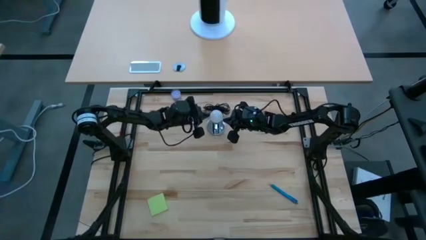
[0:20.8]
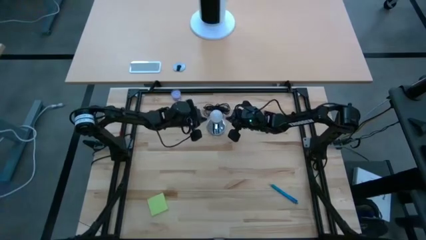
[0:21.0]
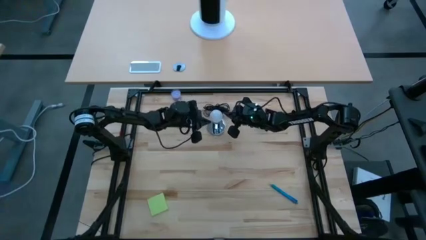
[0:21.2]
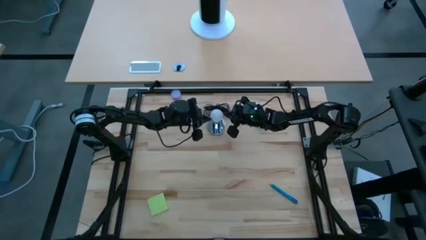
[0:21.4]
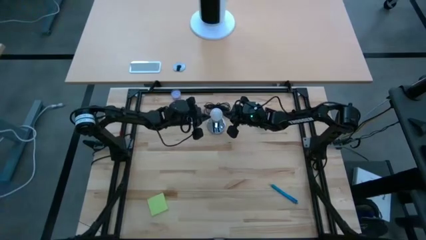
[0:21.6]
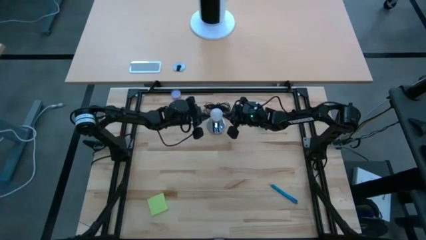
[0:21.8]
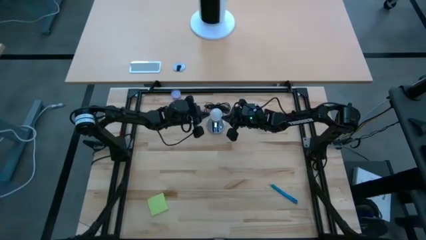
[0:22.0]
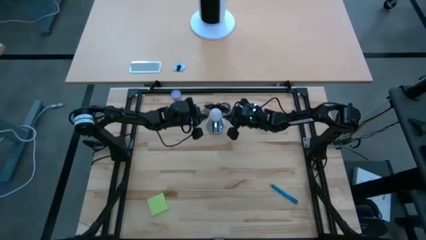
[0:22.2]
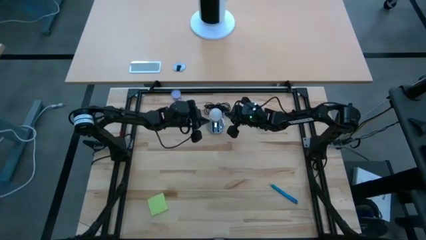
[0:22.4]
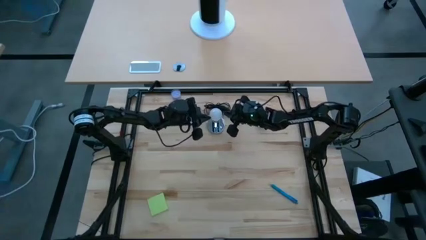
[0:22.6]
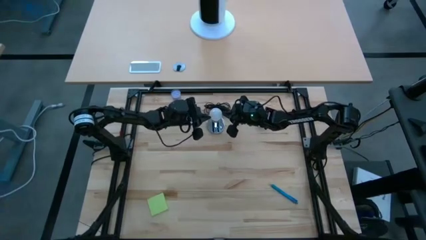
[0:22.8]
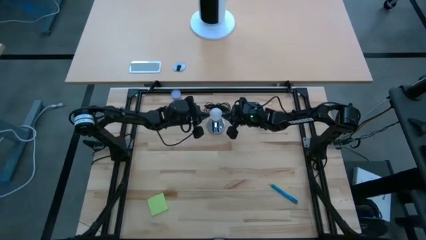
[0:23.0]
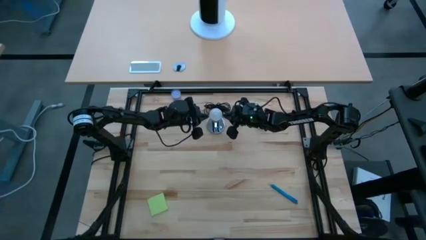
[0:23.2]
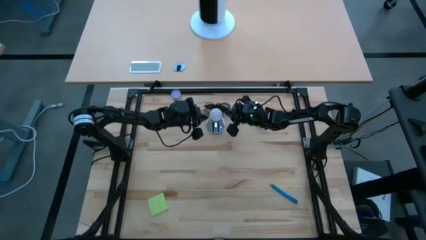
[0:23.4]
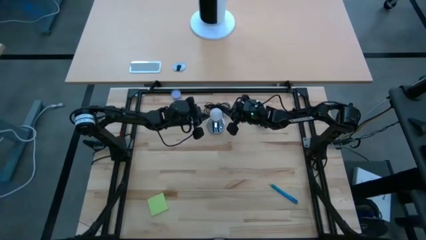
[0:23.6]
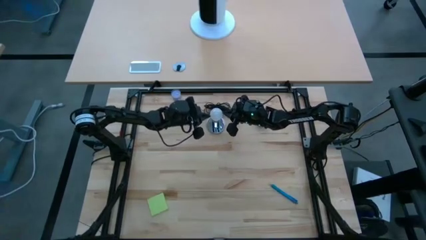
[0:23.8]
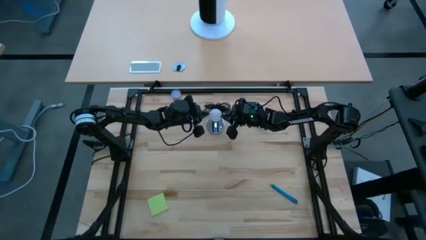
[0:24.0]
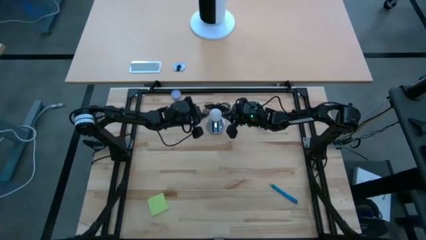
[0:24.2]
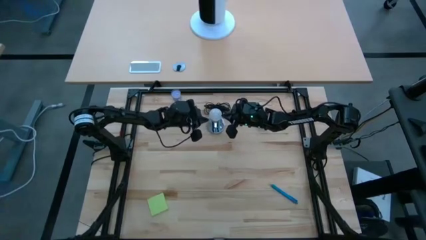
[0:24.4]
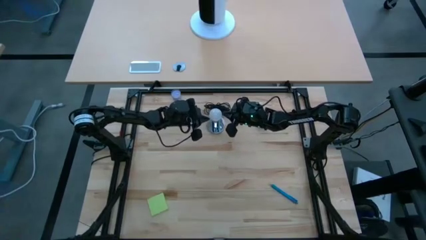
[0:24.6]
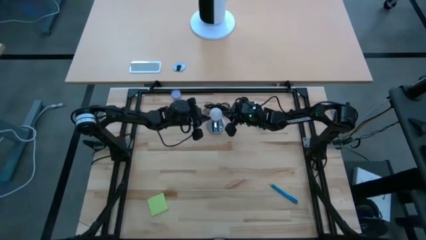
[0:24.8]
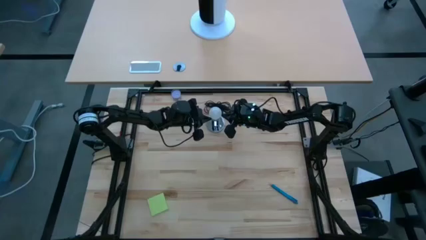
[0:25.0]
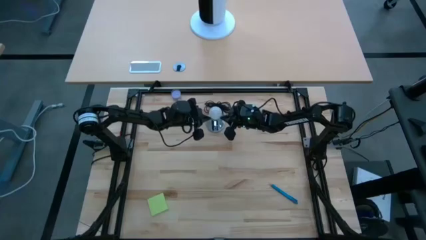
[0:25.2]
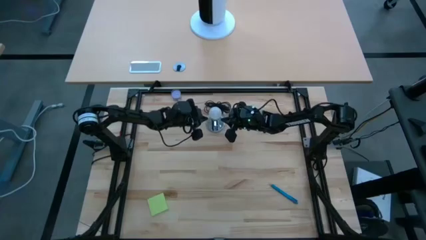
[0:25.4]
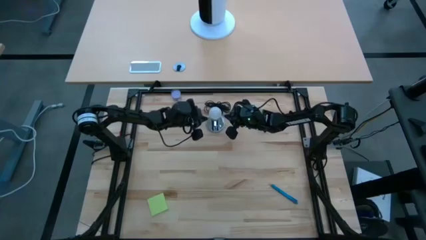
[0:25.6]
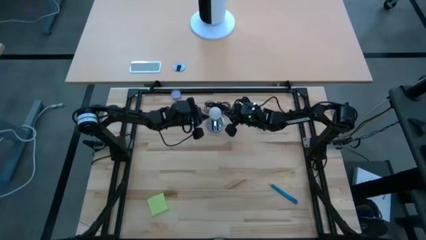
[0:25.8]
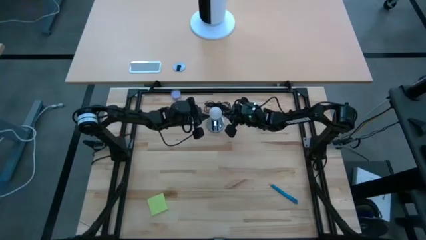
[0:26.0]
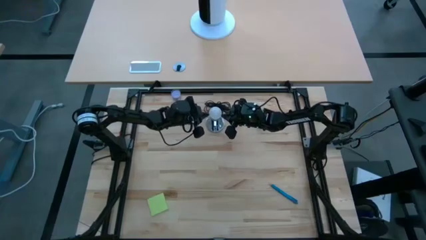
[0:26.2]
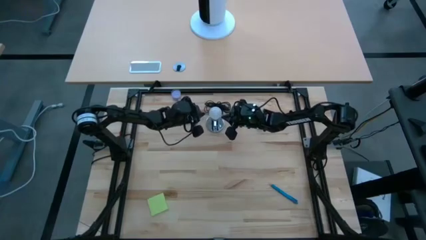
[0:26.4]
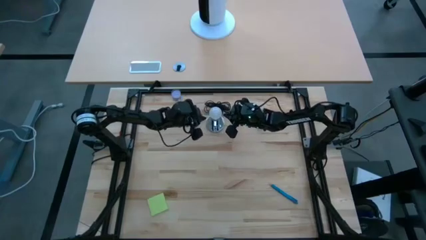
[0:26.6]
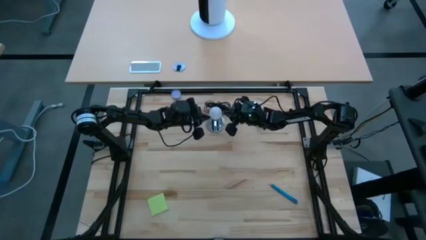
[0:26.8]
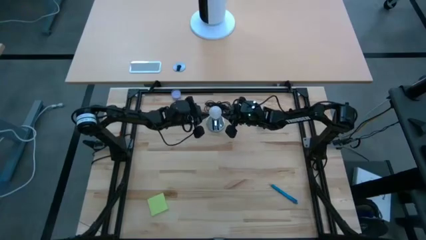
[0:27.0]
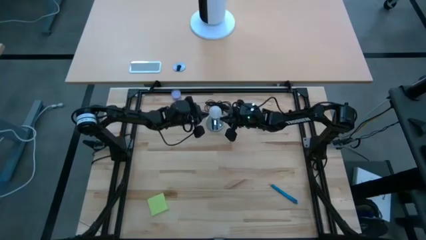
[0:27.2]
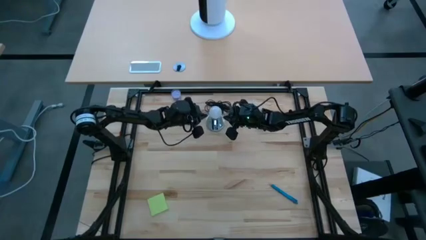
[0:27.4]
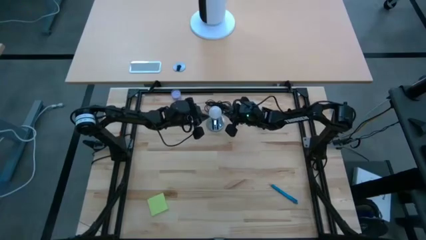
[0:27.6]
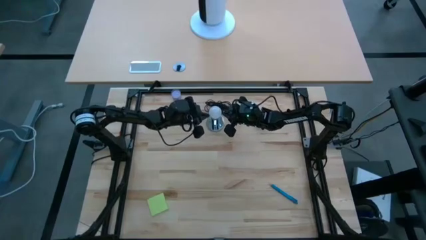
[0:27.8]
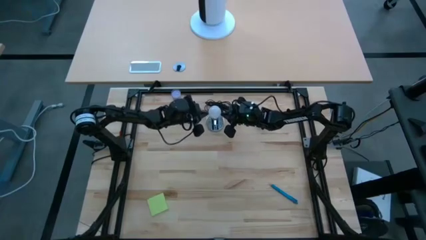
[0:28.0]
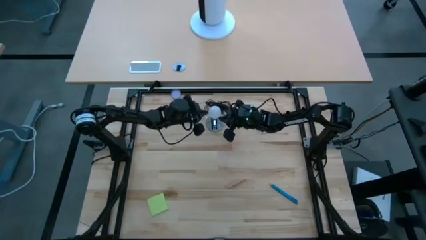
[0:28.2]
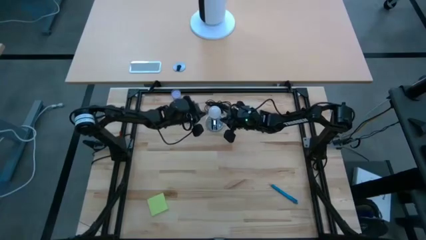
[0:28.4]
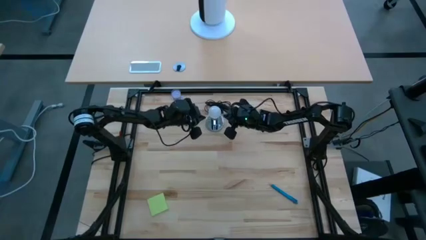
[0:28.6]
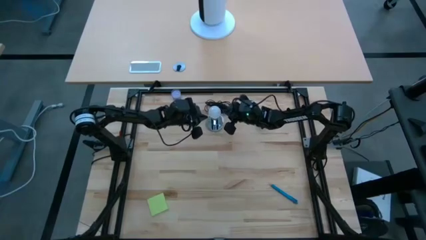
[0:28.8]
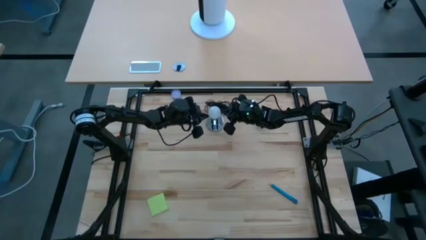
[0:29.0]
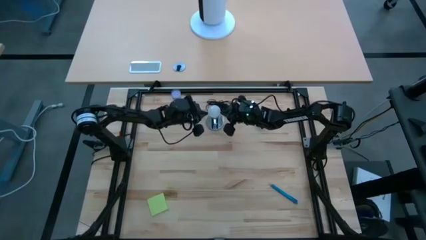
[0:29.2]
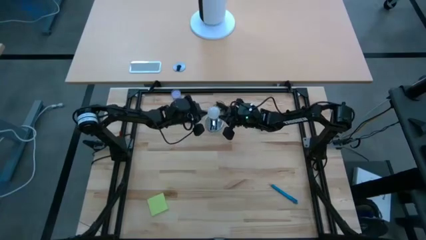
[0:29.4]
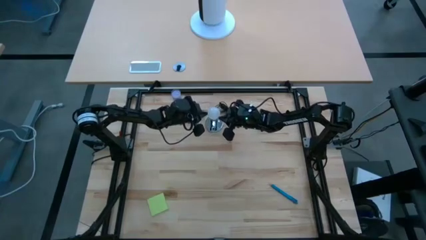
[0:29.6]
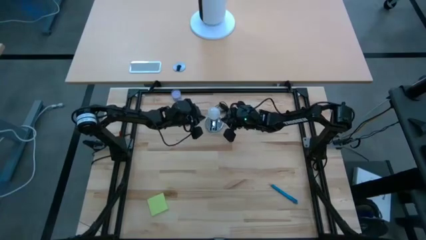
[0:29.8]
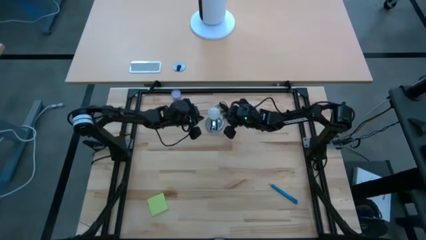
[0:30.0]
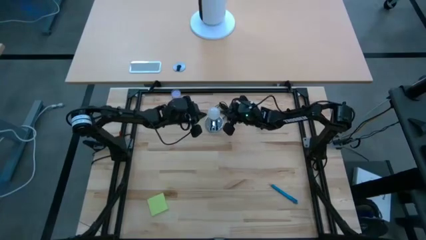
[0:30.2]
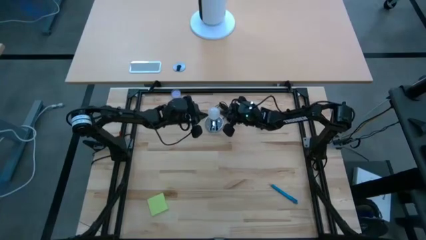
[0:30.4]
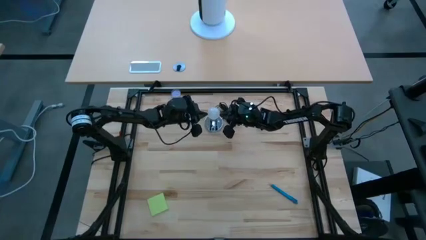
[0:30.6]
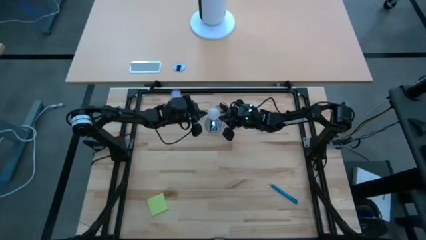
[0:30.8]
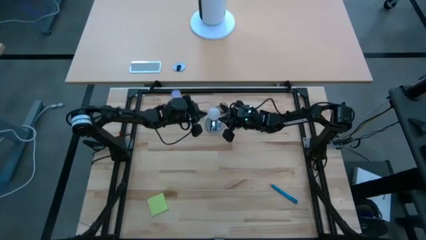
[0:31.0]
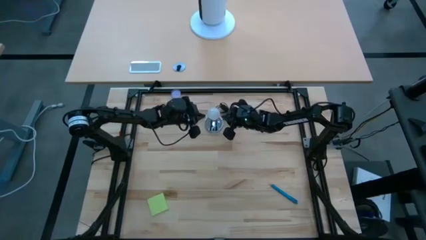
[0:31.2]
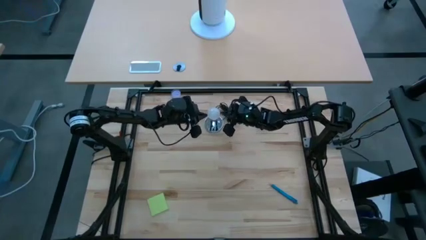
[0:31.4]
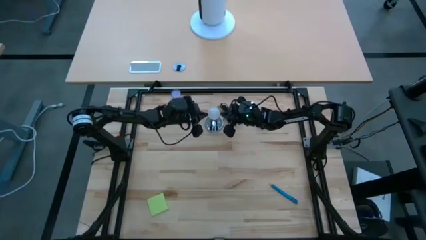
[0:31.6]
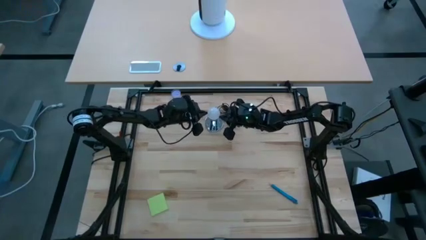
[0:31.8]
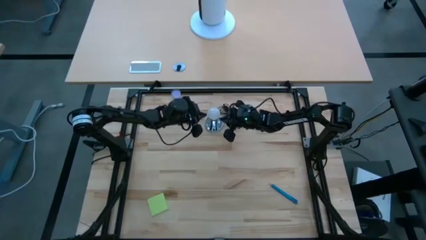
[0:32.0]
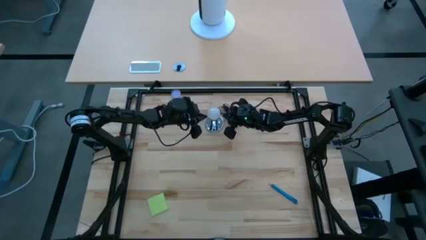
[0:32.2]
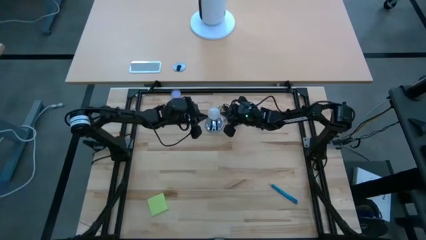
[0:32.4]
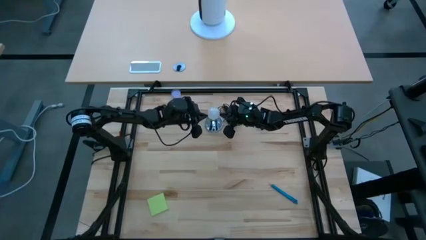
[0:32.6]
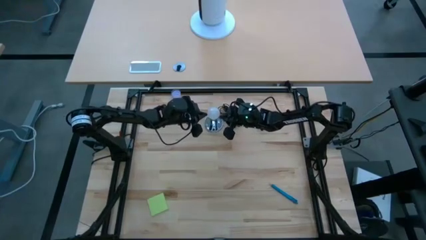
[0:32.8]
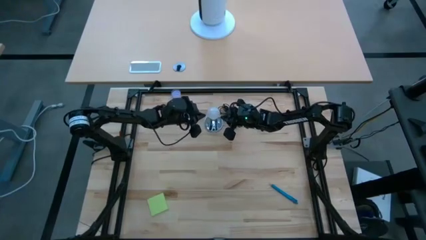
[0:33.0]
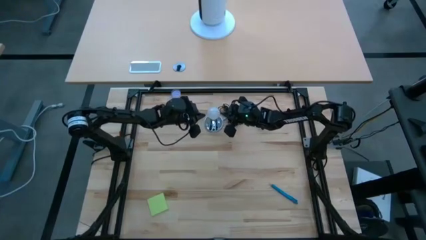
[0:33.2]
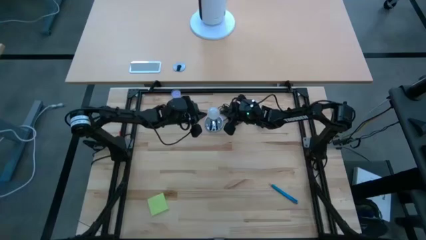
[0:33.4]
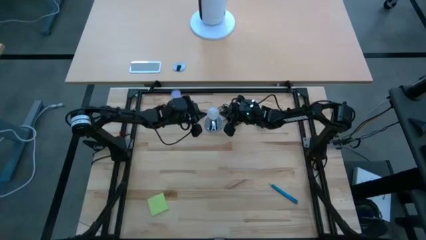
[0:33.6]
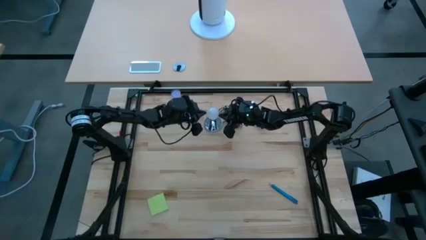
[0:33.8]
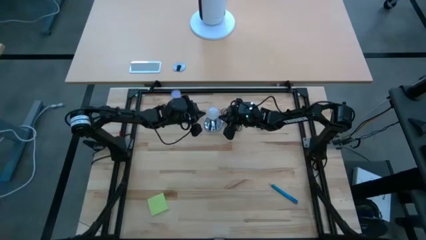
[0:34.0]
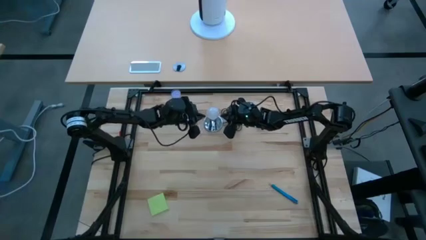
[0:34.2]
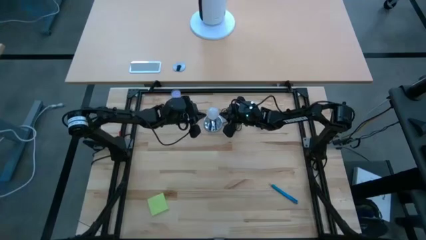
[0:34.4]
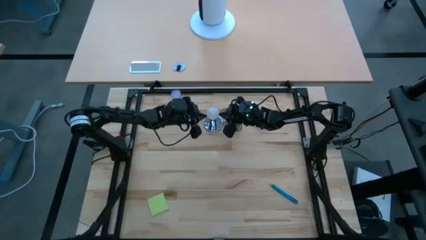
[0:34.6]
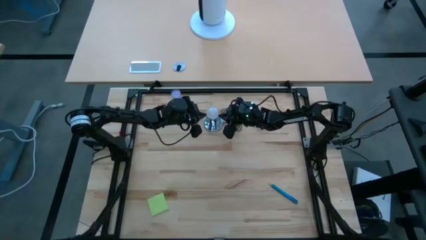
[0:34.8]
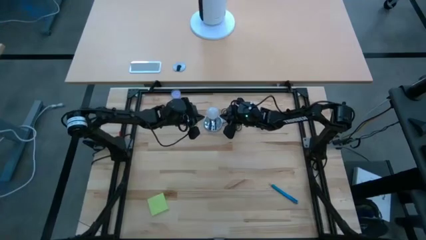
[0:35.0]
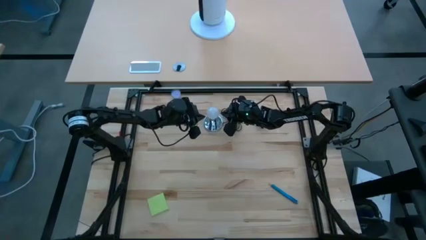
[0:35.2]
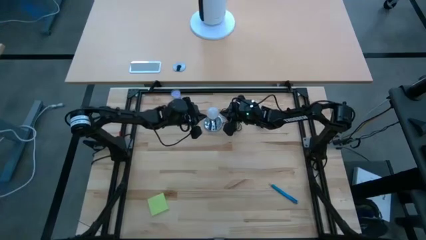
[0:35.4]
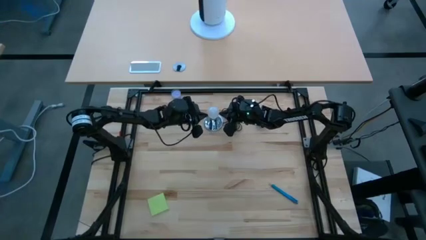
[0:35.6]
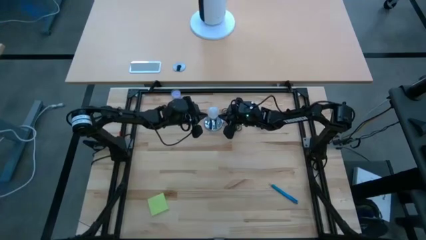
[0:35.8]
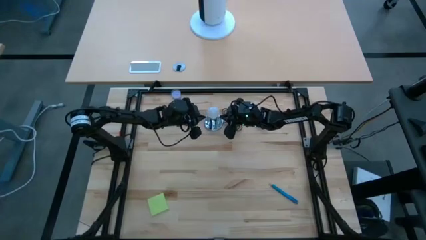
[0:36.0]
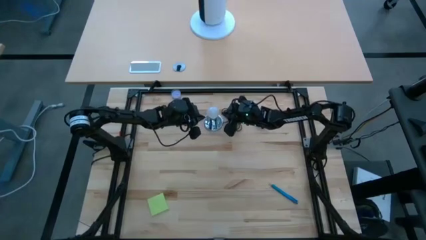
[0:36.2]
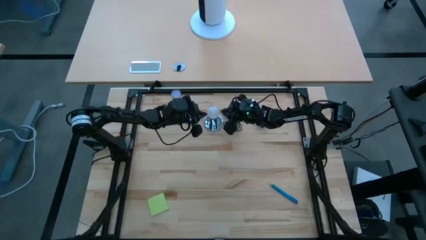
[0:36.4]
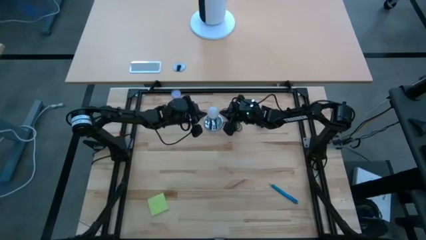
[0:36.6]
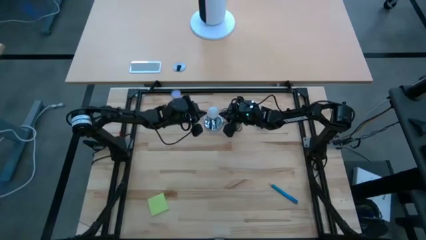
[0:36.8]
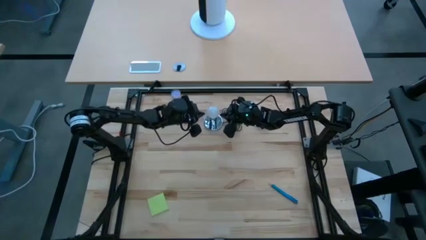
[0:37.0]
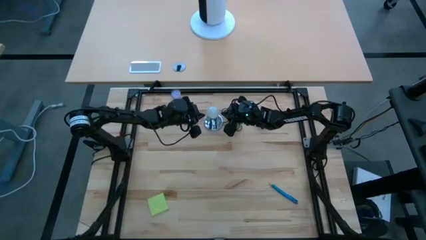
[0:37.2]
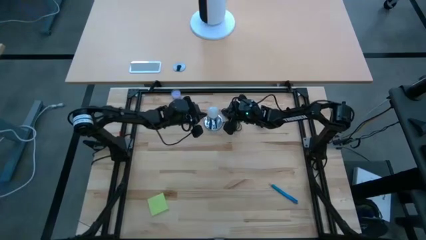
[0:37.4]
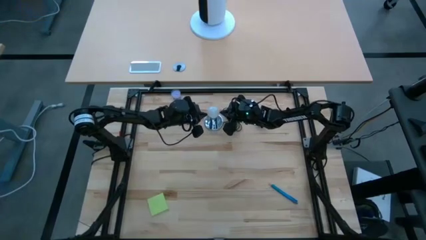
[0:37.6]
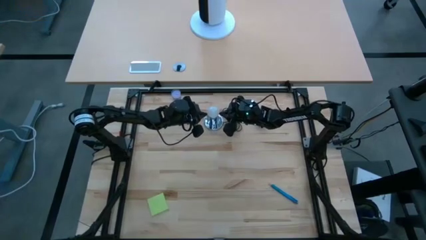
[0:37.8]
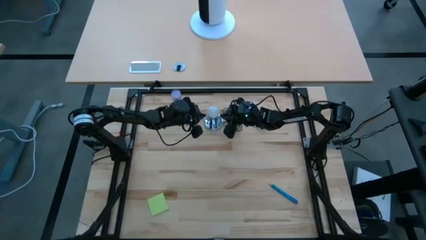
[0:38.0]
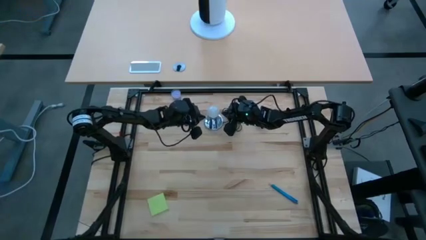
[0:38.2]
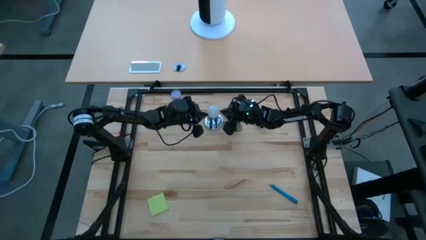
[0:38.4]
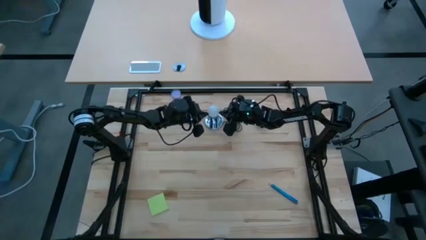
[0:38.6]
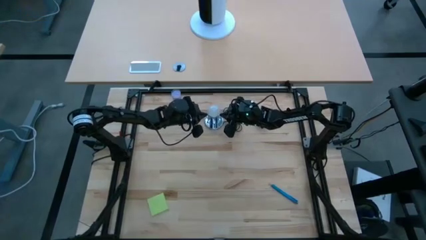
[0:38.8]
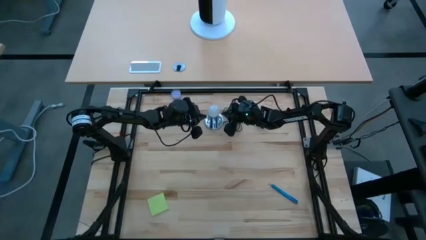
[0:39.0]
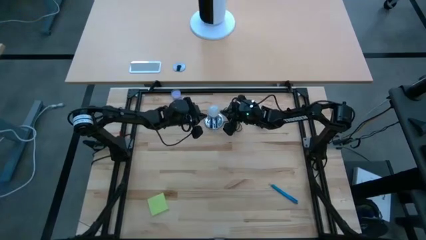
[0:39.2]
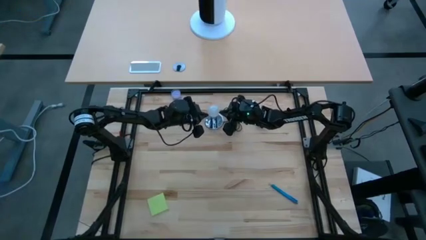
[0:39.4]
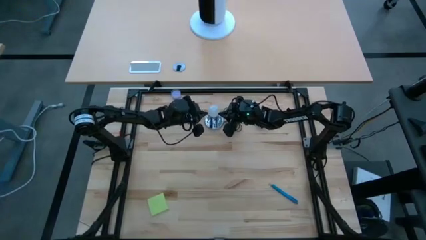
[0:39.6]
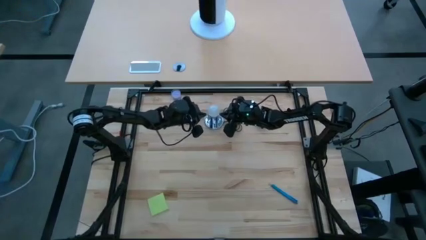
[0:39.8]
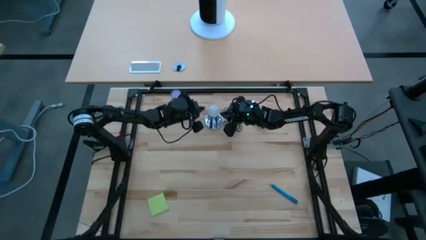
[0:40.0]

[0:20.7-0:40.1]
Task: Screw lightbulb
Insert the bulb into the lamp
